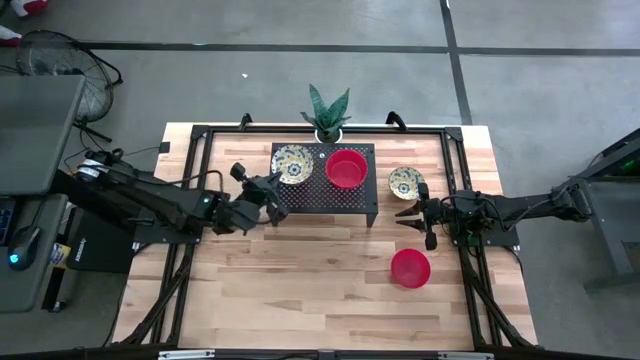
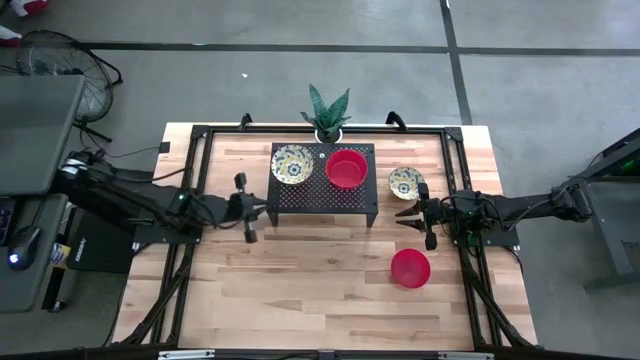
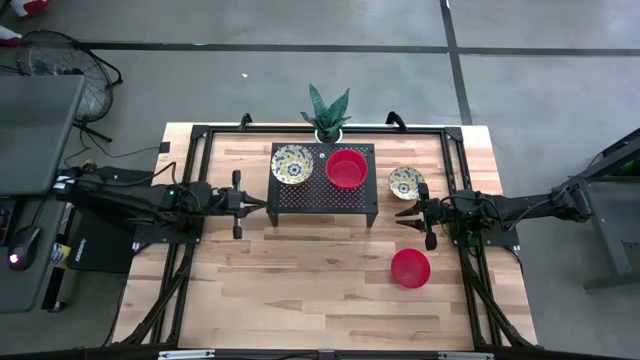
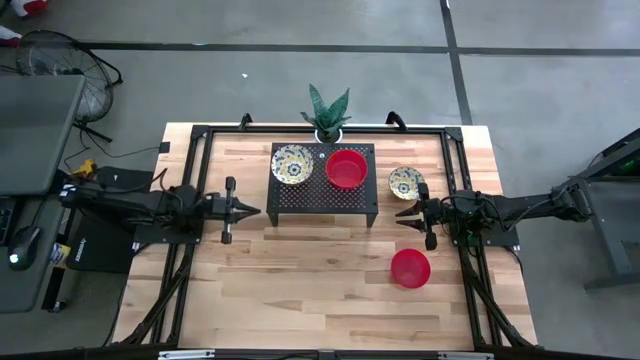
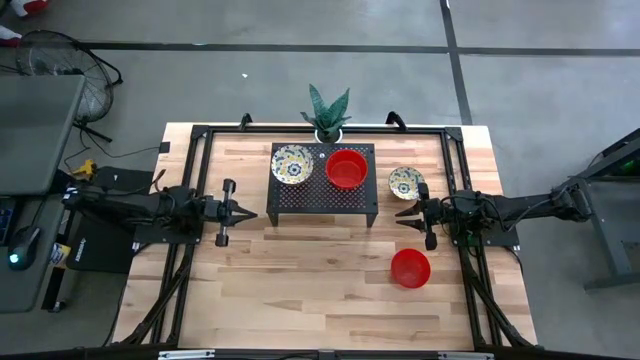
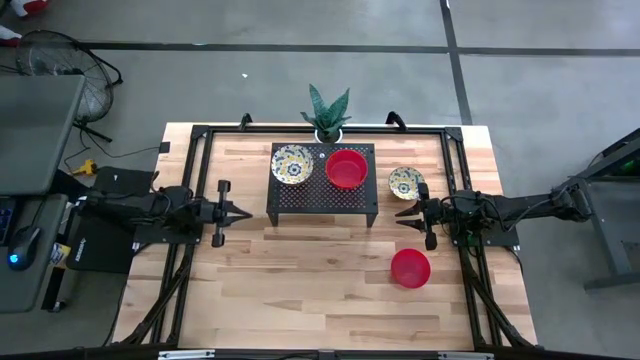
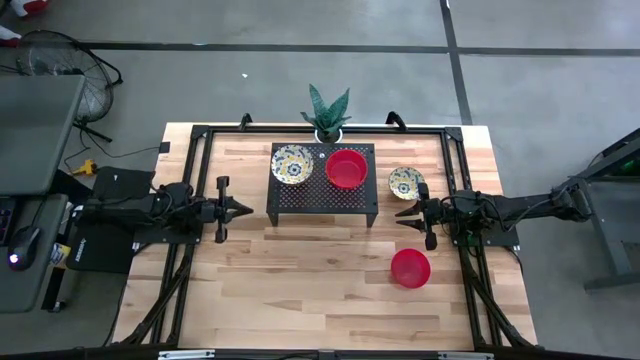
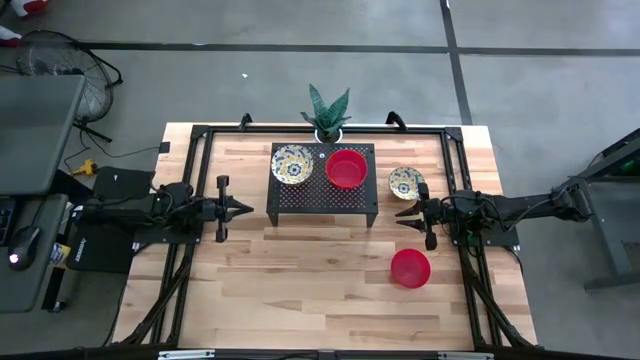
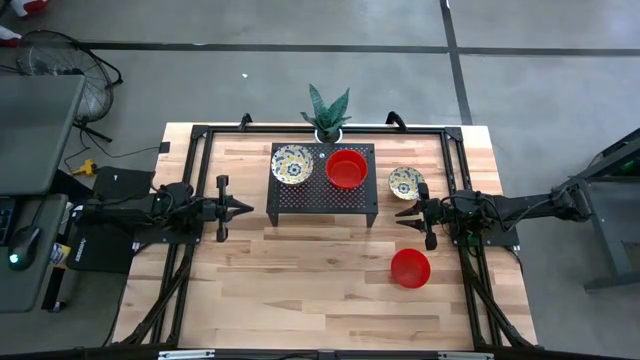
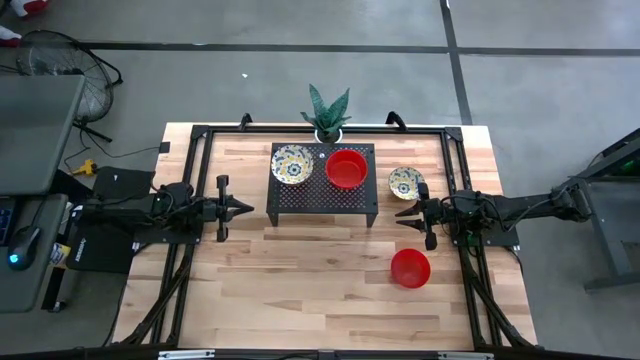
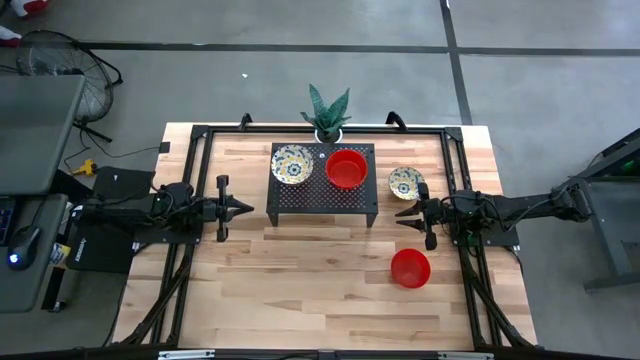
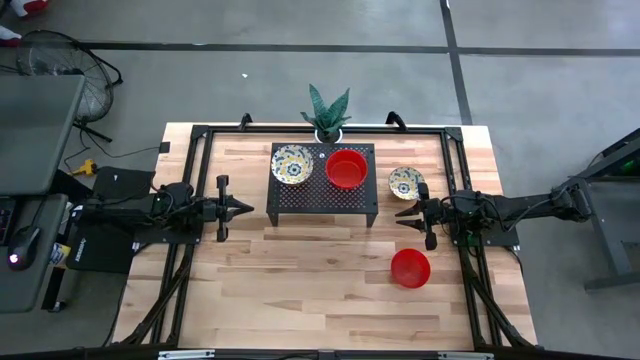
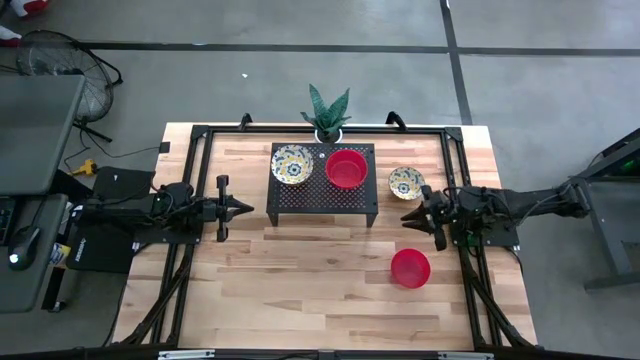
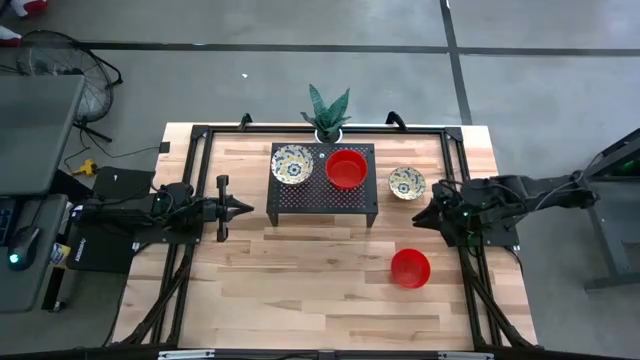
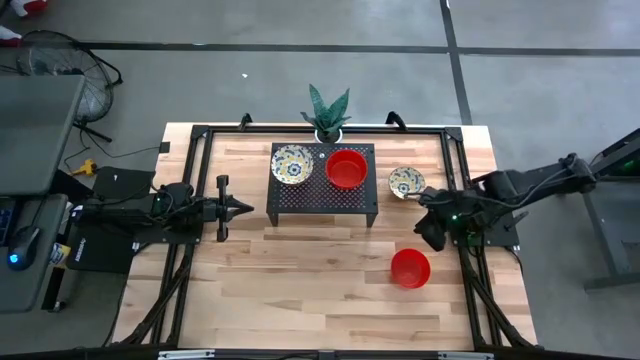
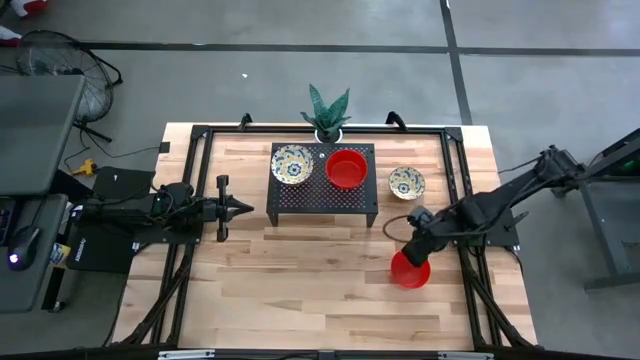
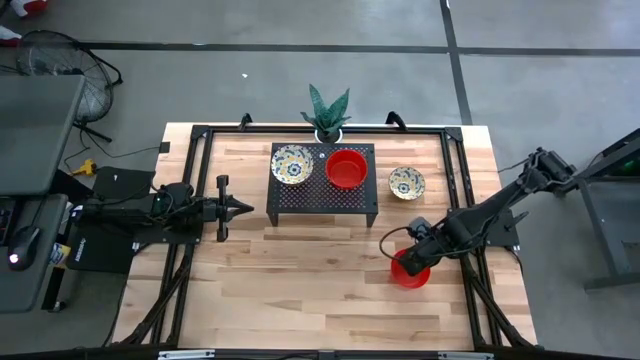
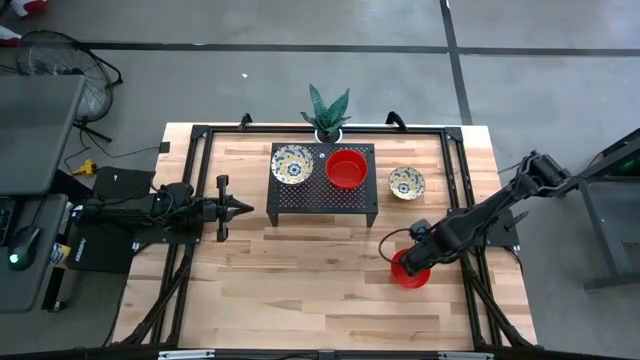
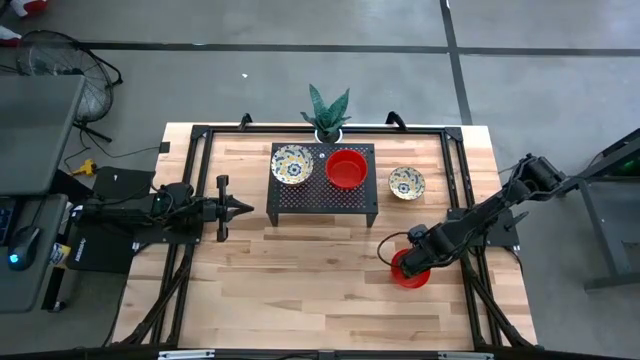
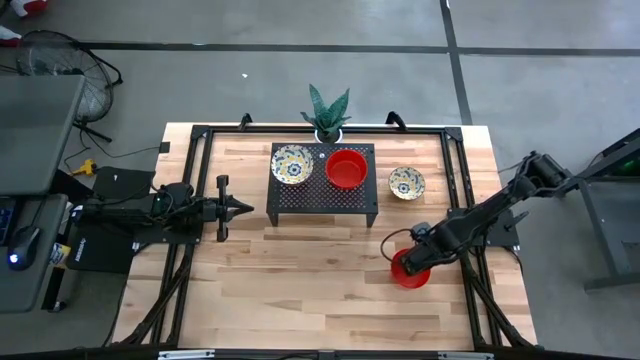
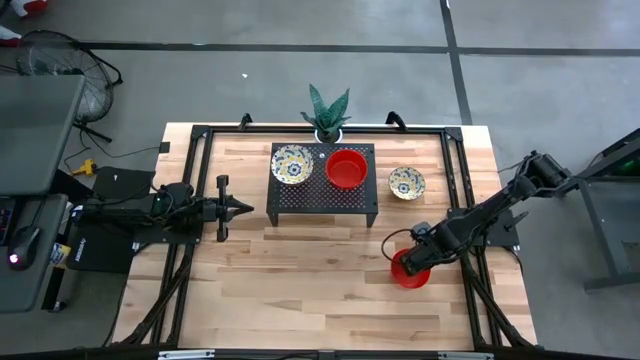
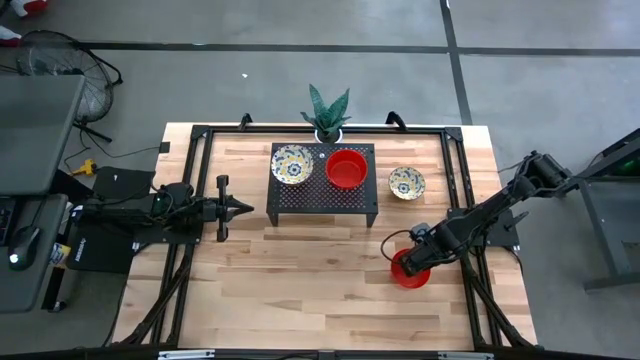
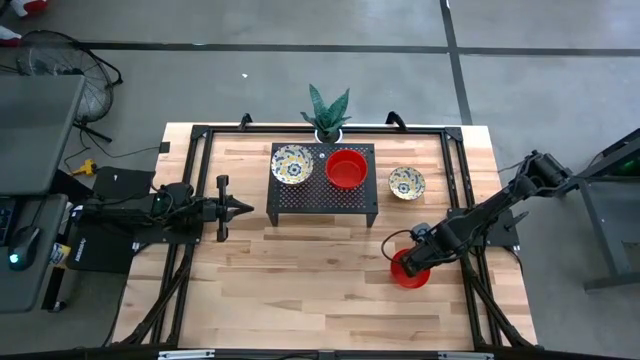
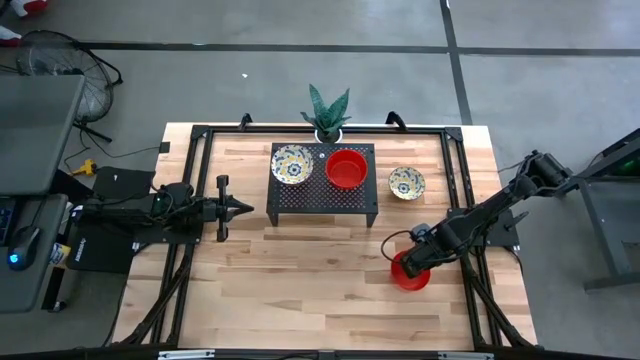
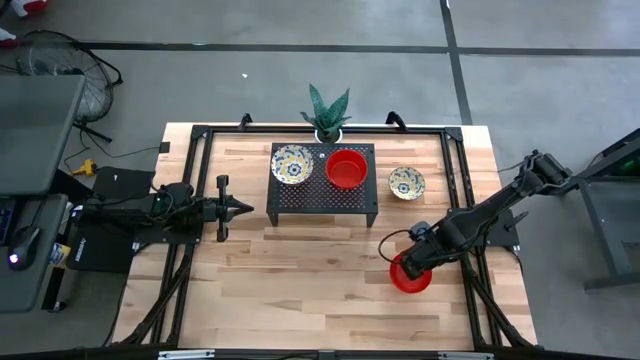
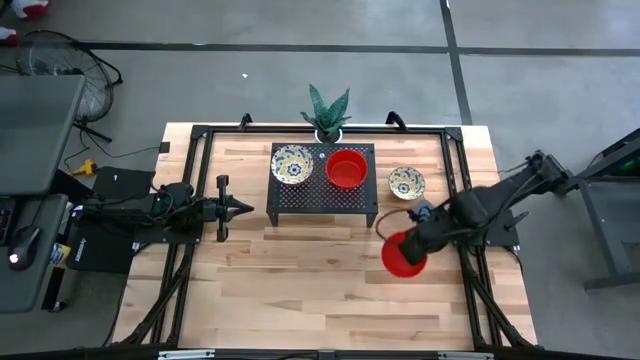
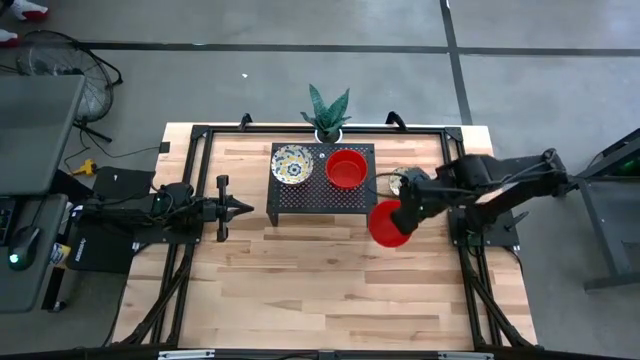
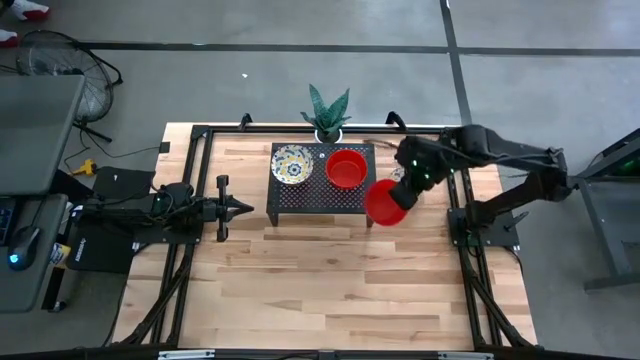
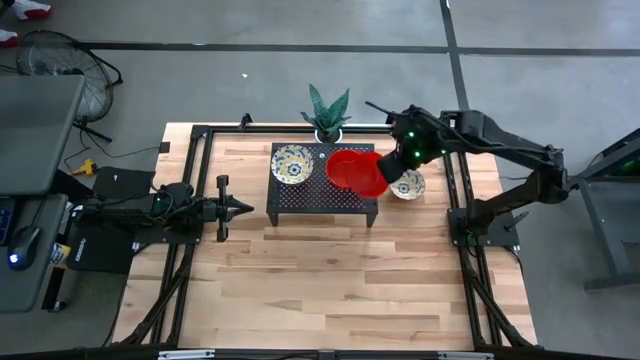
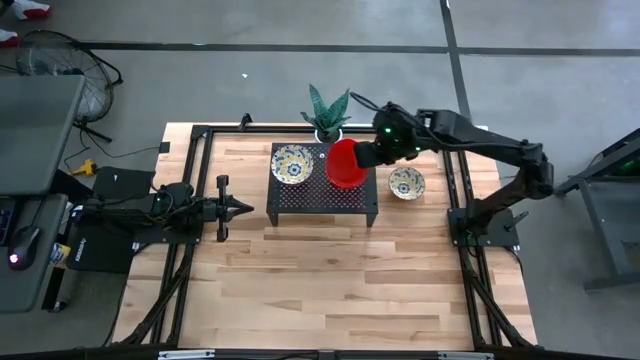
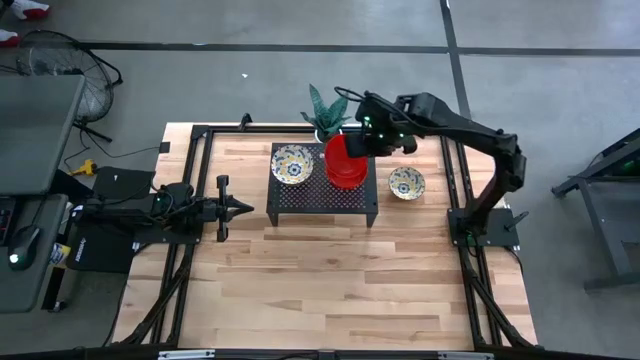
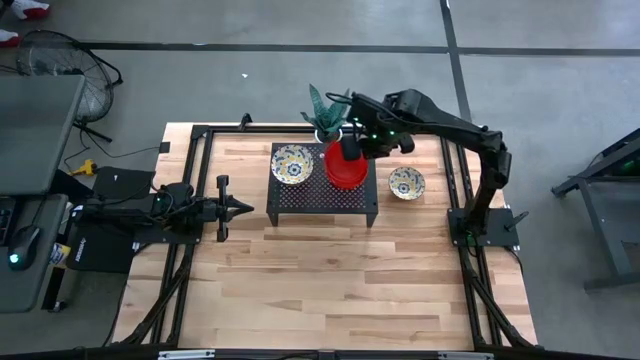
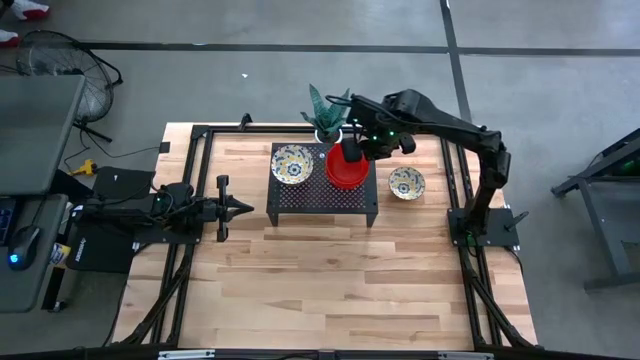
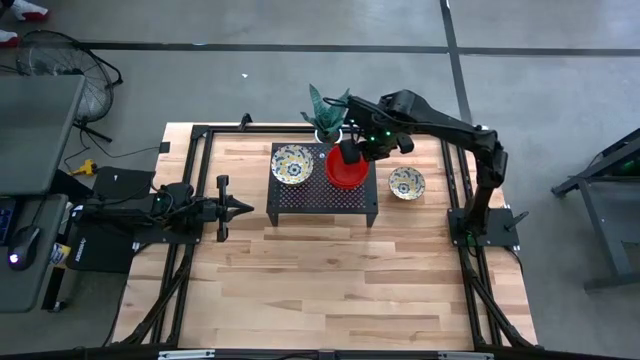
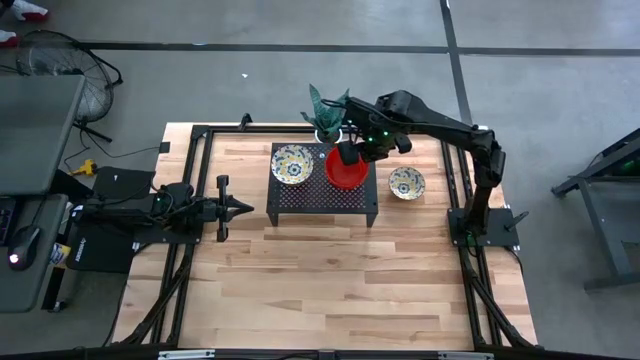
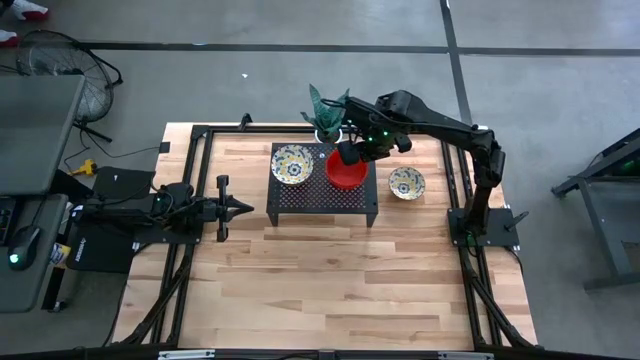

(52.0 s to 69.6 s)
Task: Pick & Place Mini bowls
Stack the red bowl on the red bowls on the shelf

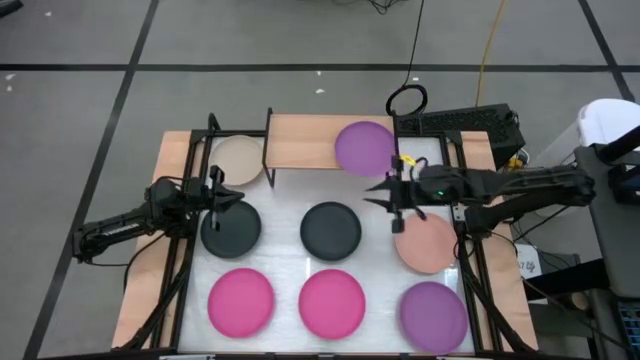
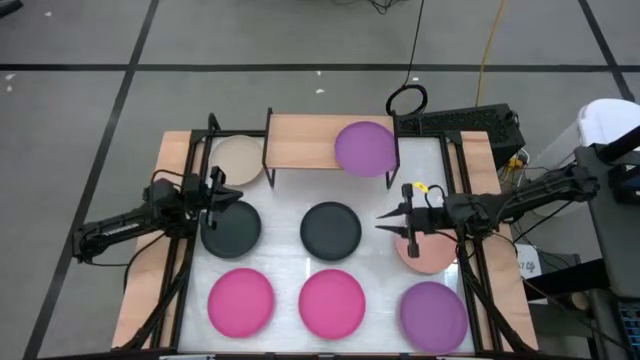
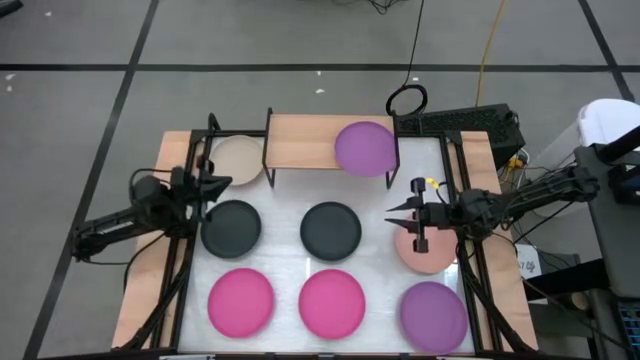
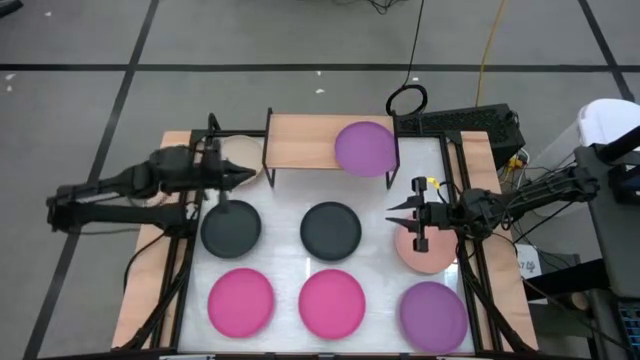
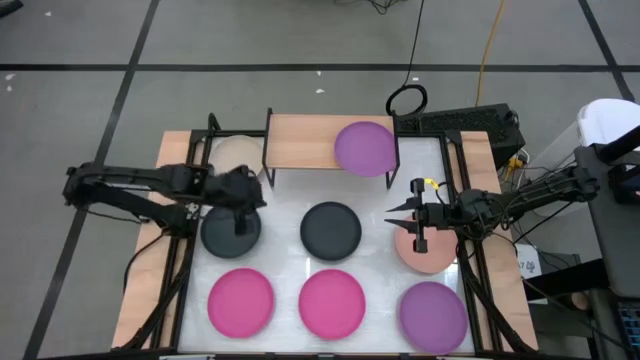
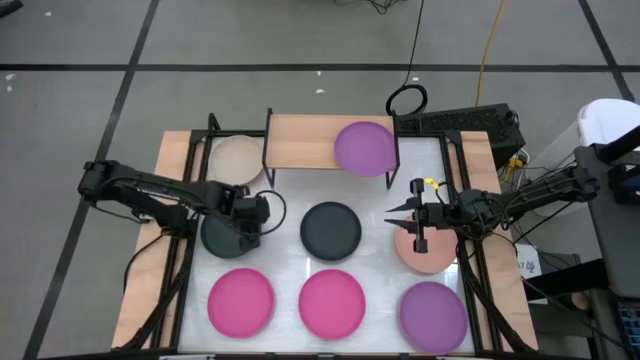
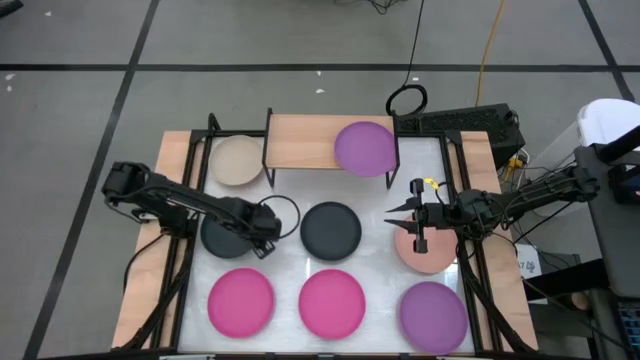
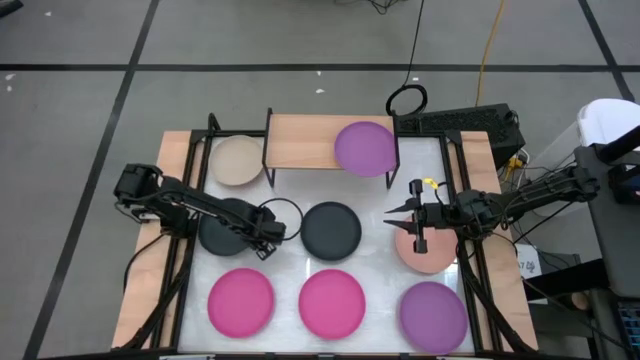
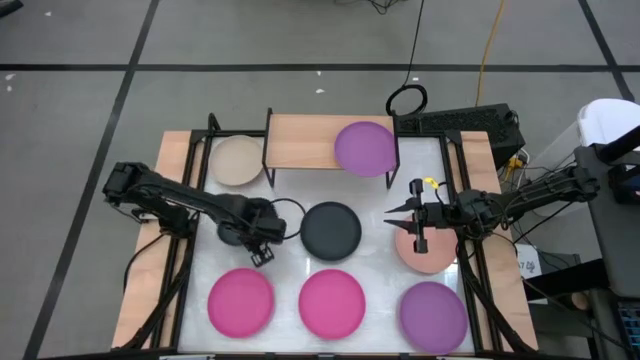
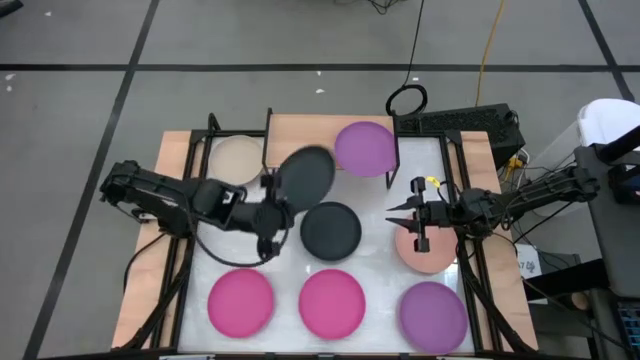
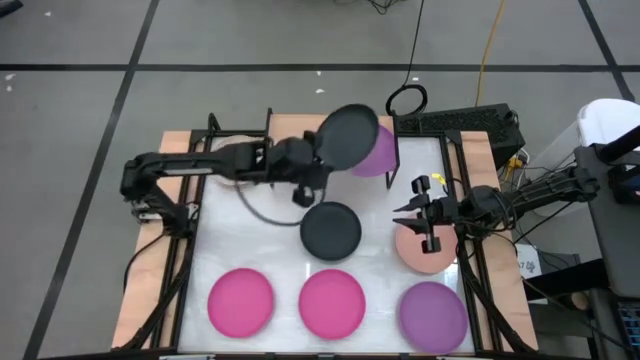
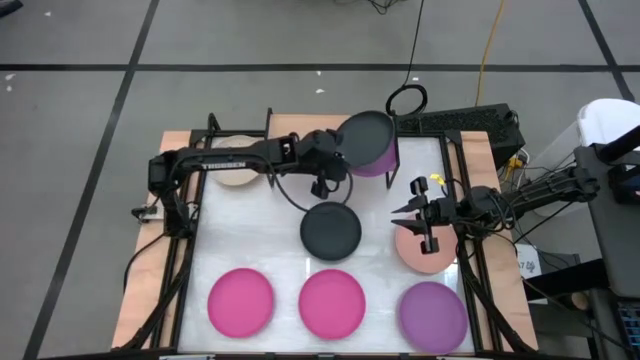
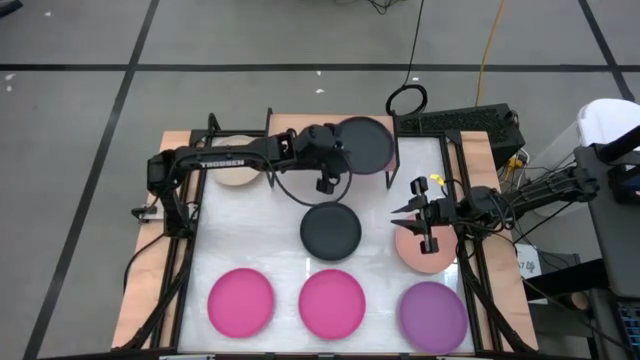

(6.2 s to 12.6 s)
Task: Place and stack plates onto a shelf
Stack the left black plate on top of the violet plate on the shelf
